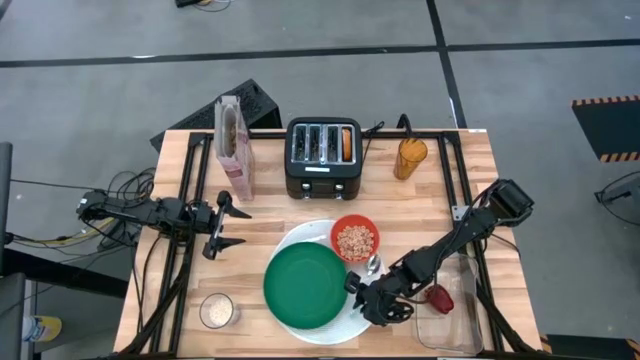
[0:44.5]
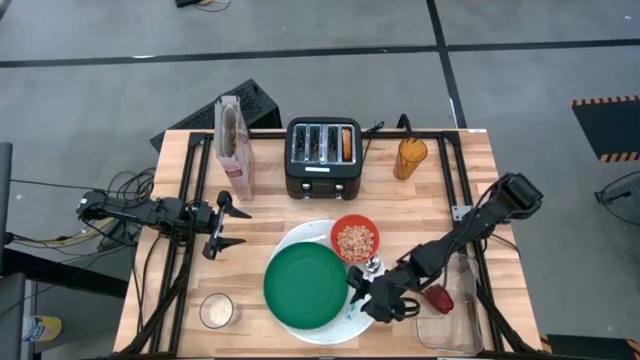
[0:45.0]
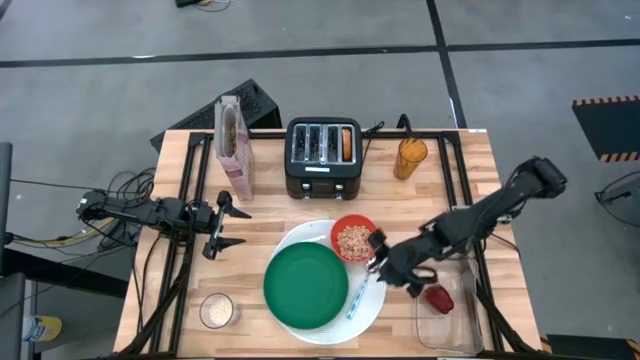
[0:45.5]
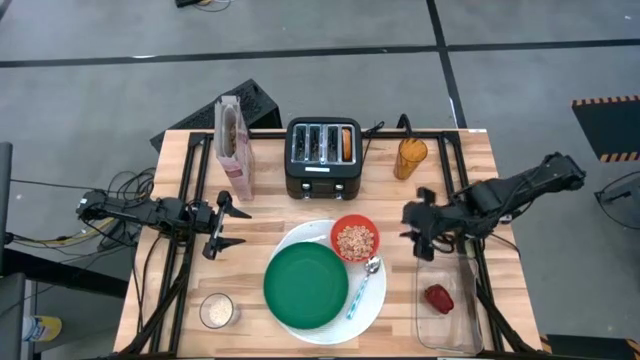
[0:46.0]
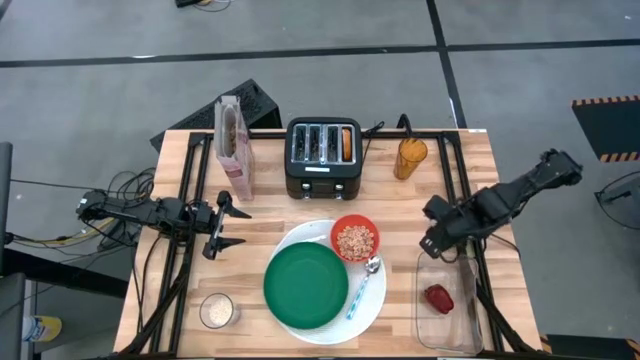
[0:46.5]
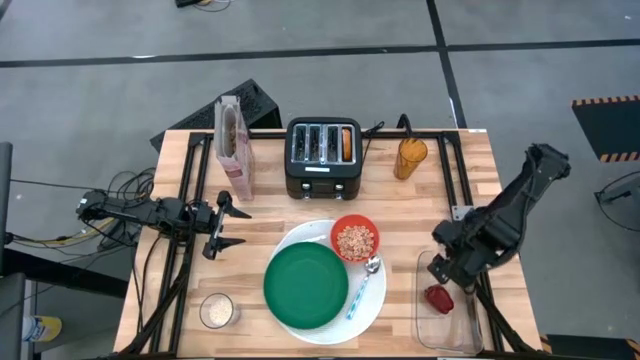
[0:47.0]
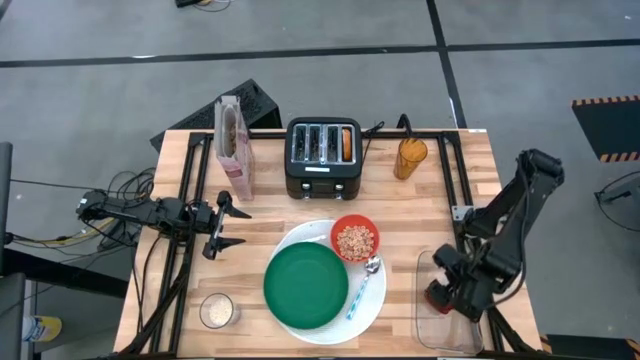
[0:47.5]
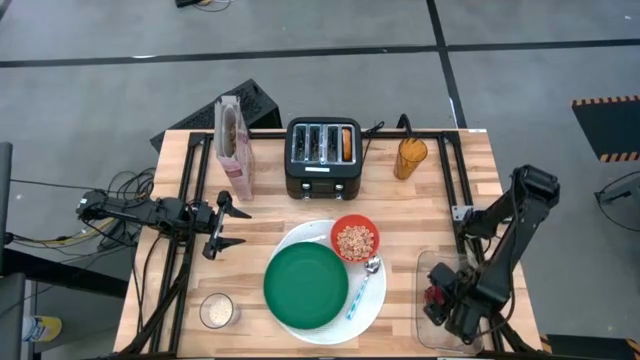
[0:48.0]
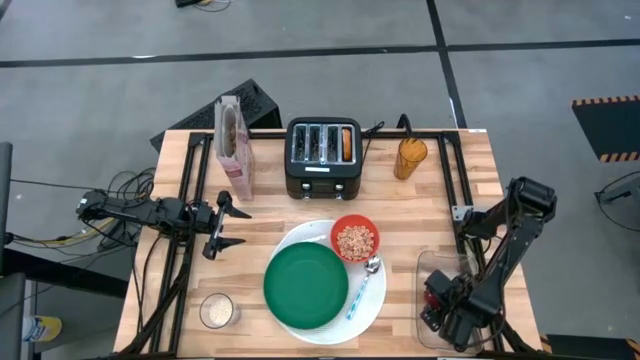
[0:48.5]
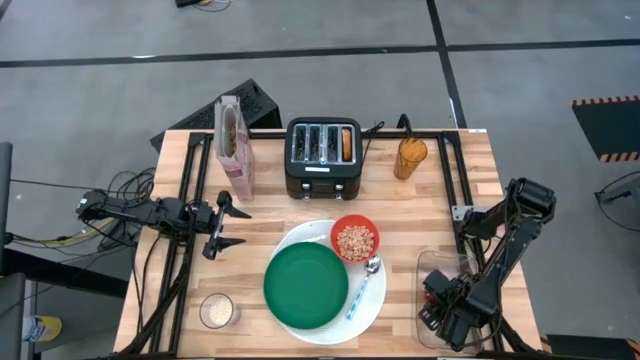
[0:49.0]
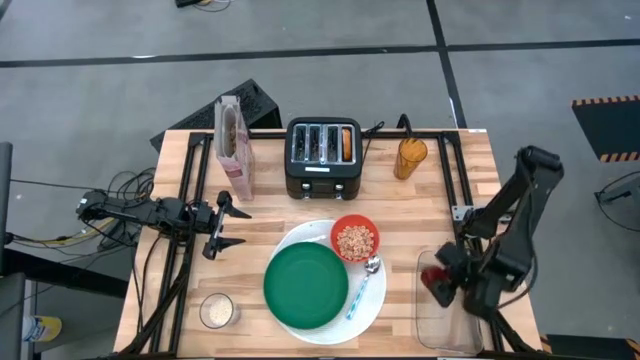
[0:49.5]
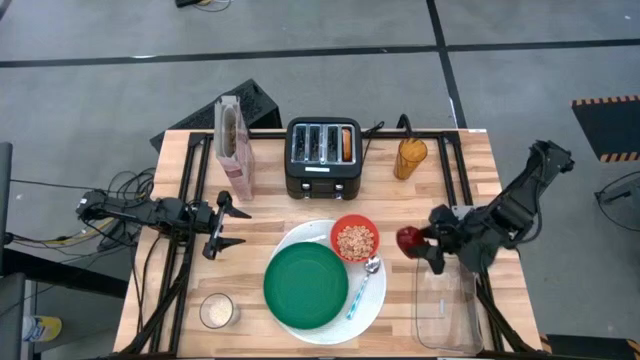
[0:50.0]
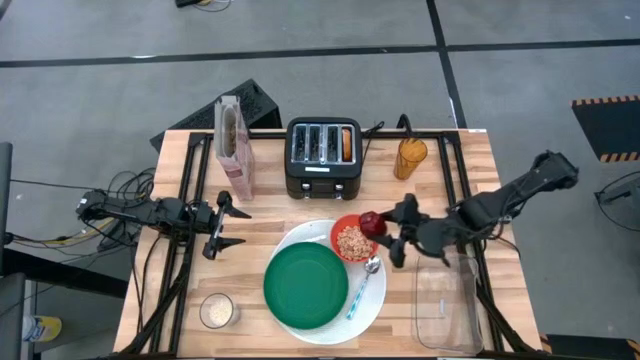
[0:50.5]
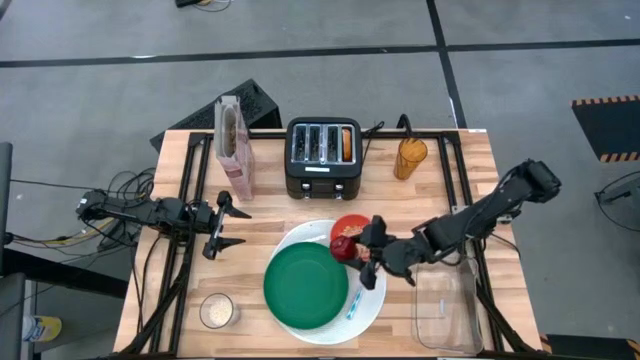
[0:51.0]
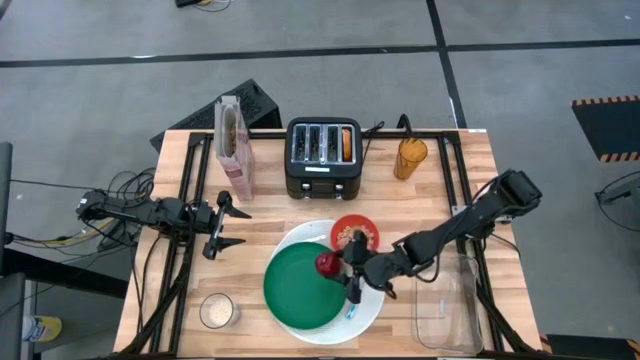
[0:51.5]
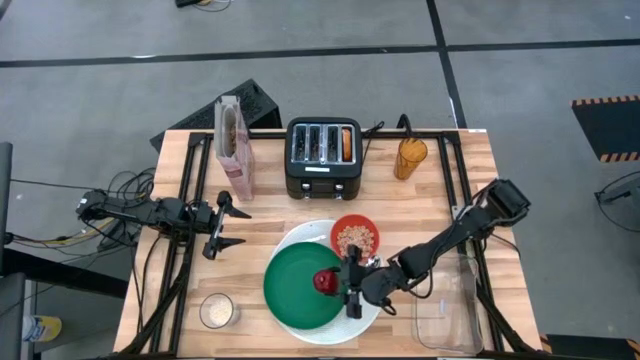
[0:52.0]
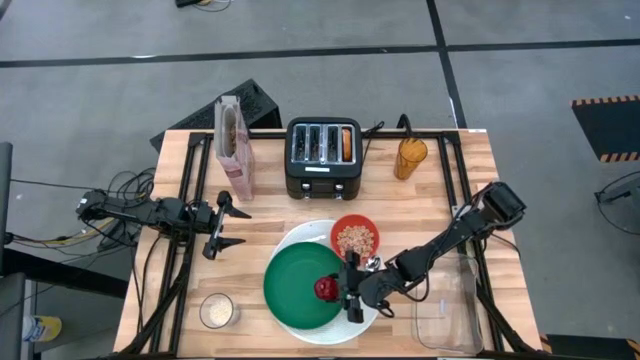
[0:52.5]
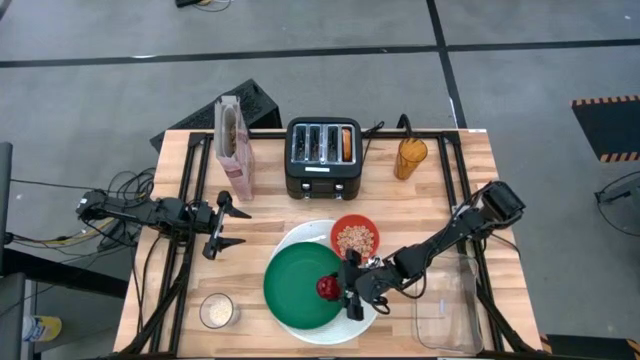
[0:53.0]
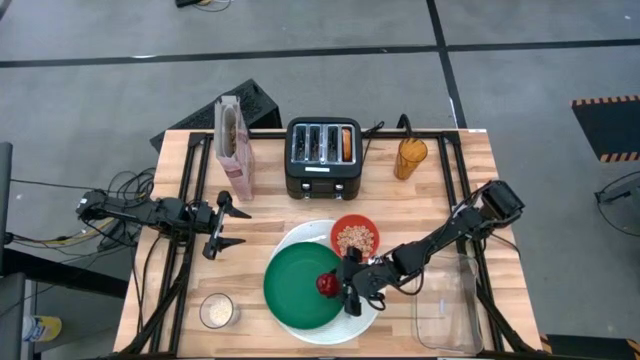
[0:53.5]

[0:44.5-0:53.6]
Task: Arrange a breakfast setting
Put the apple from the transparent bin on the green plate

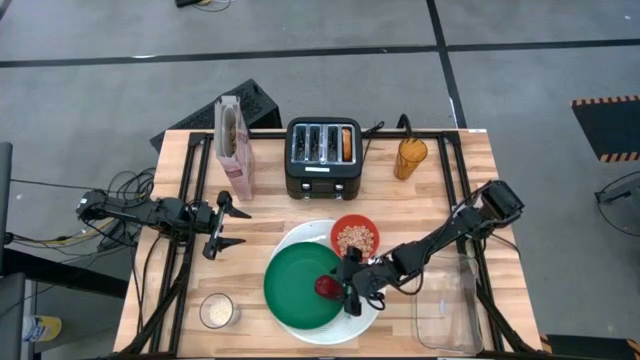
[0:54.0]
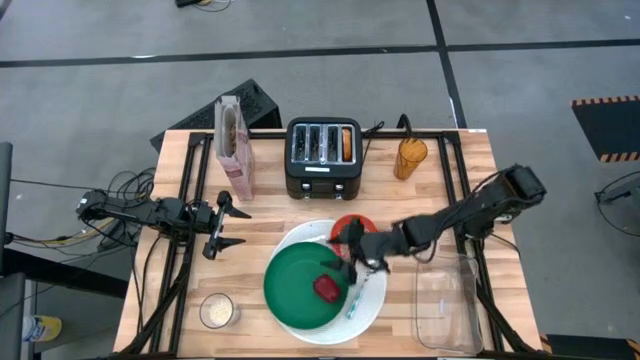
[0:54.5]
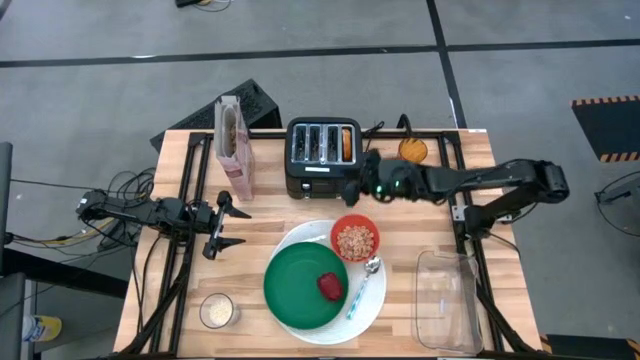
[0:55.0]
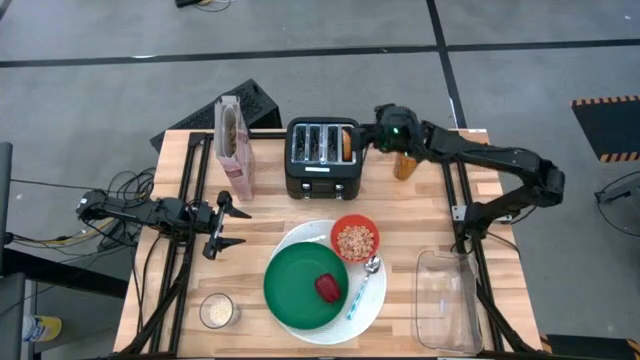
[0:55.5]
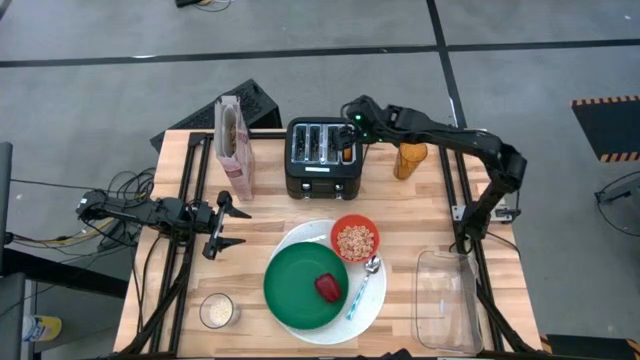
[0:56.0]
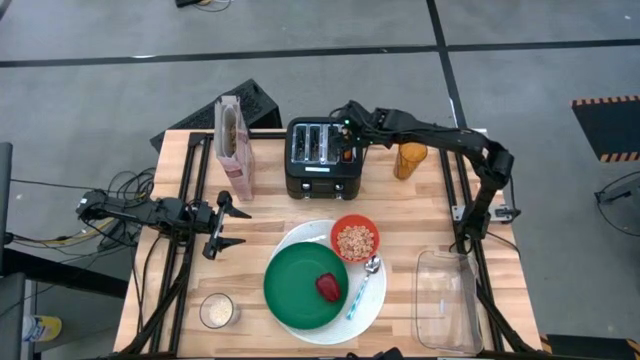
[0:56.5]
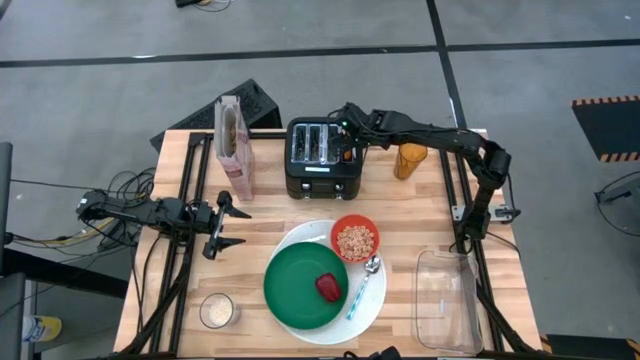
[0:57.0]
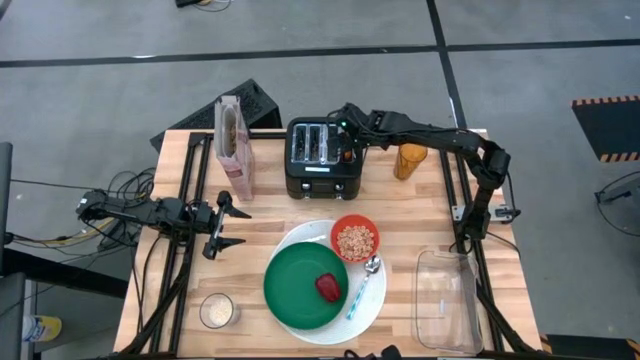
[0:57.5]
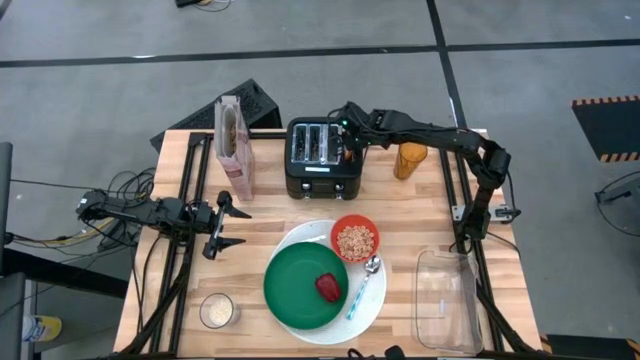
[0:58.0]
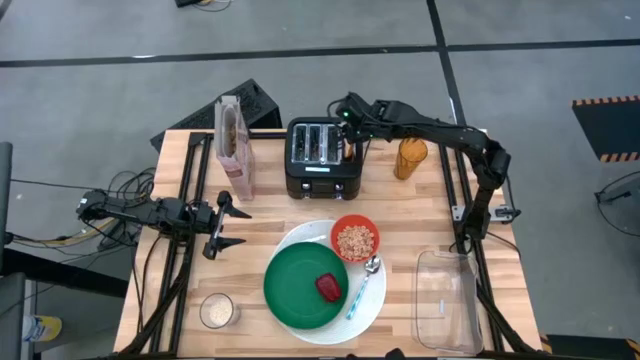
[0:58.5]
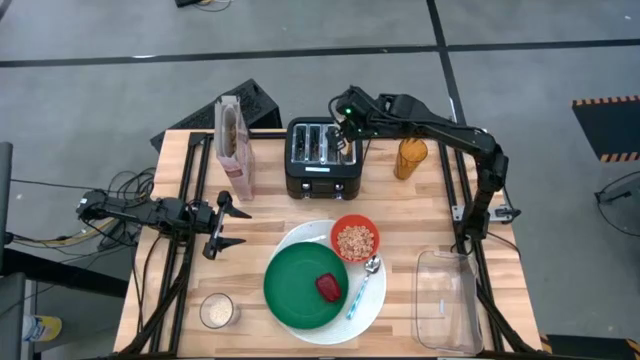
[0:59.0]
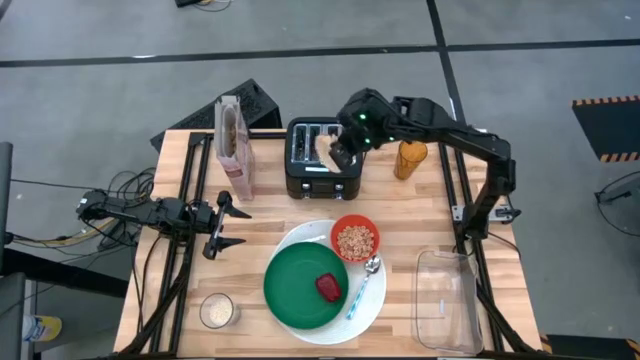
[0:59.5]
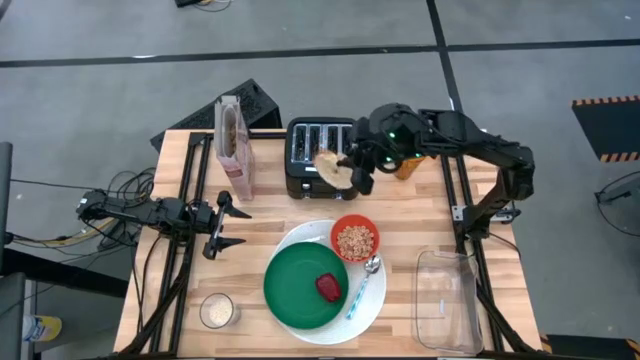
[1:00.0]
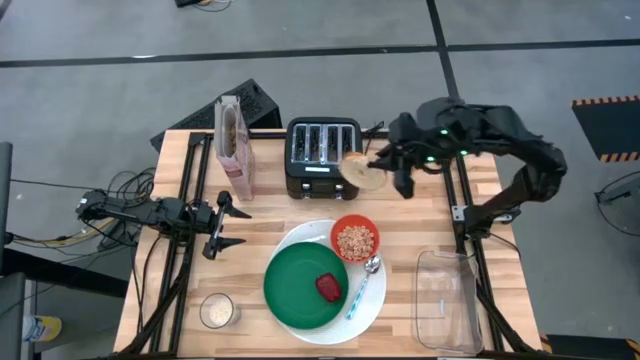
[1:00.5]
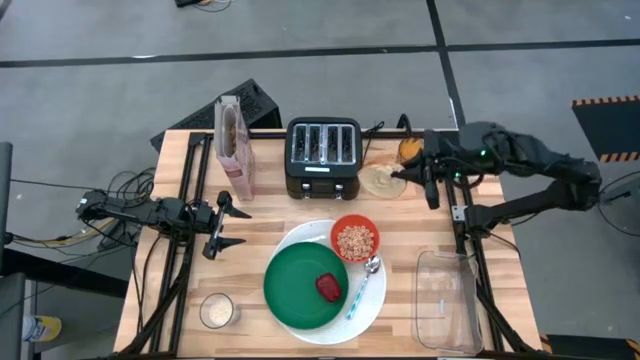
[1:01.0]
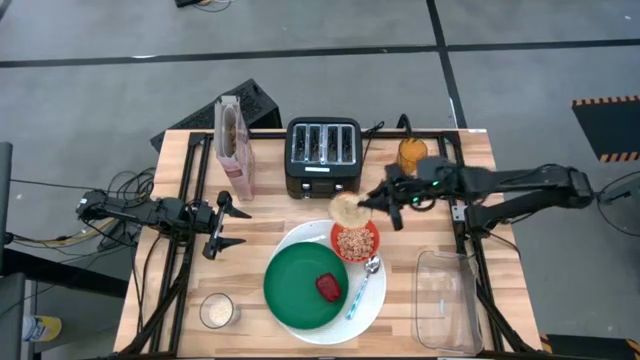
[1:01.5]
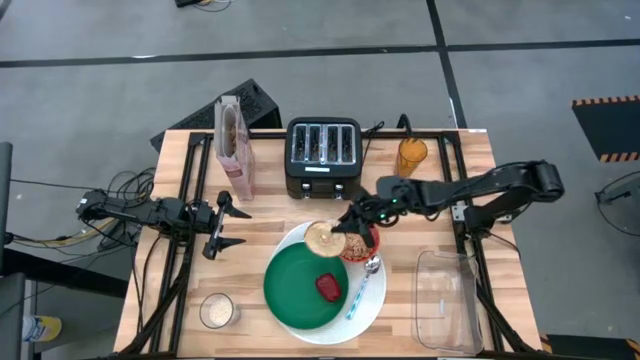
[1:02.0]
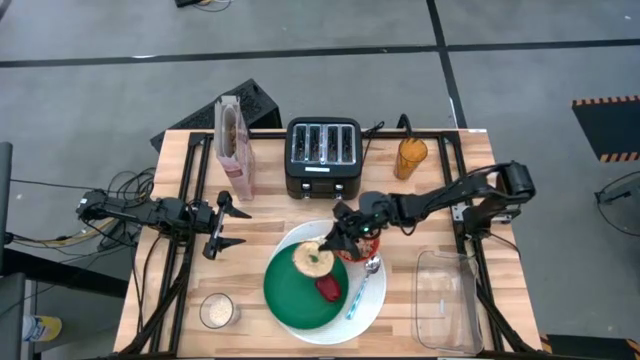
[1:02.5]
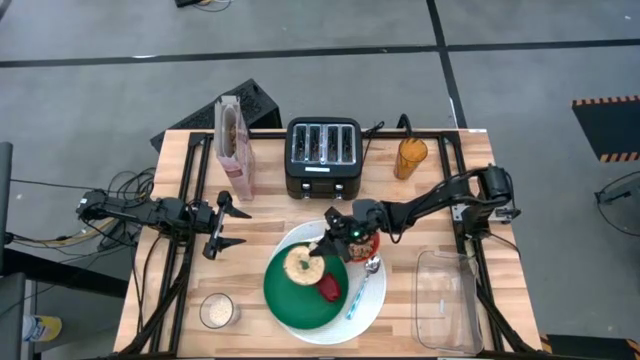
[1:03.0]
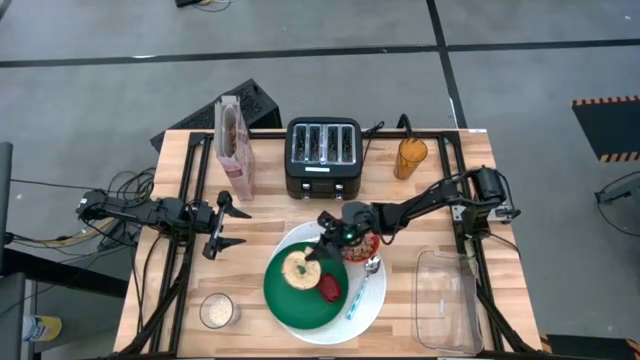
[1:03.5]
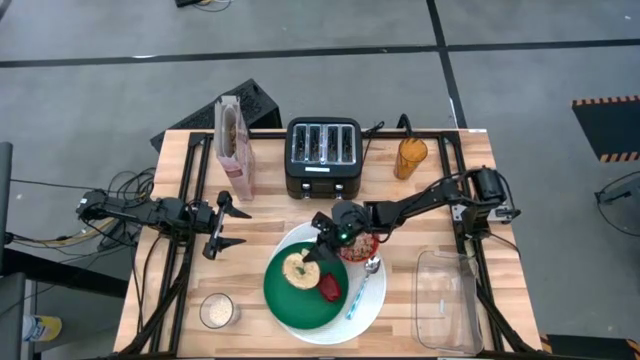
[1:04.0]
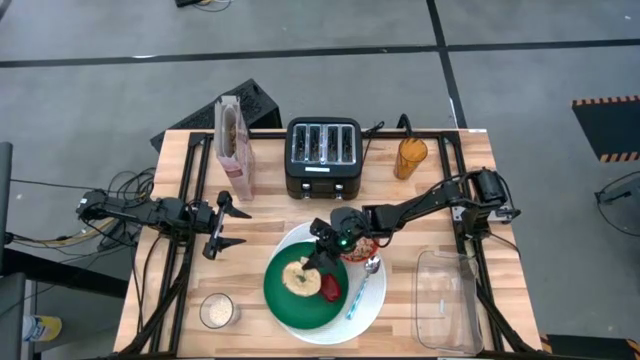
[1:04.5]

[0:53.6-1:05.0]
Put the toasted bread from the toaster on the green plate

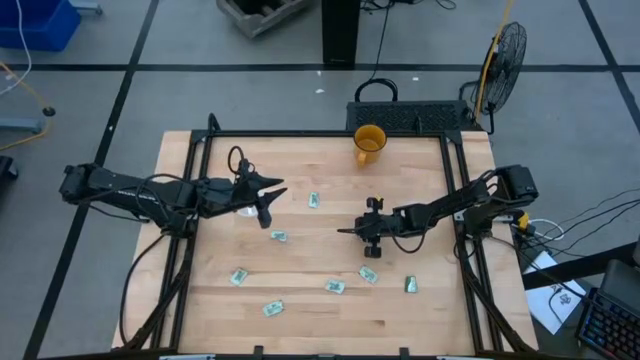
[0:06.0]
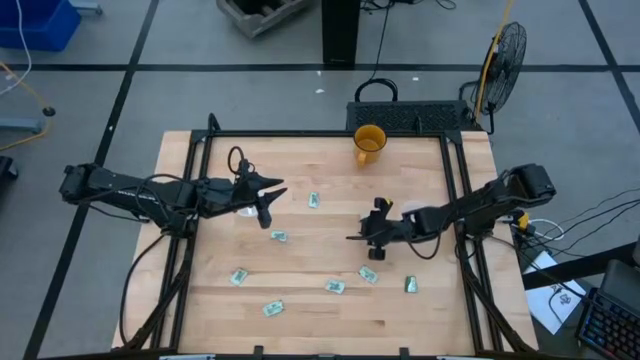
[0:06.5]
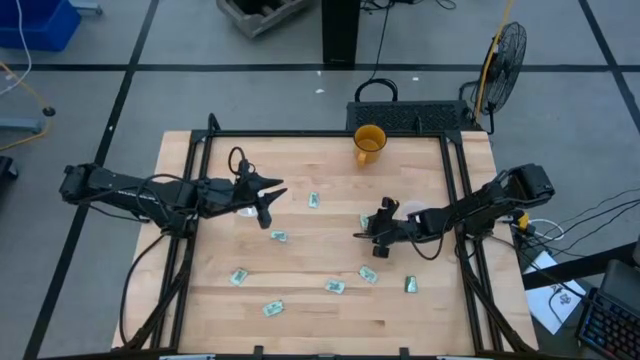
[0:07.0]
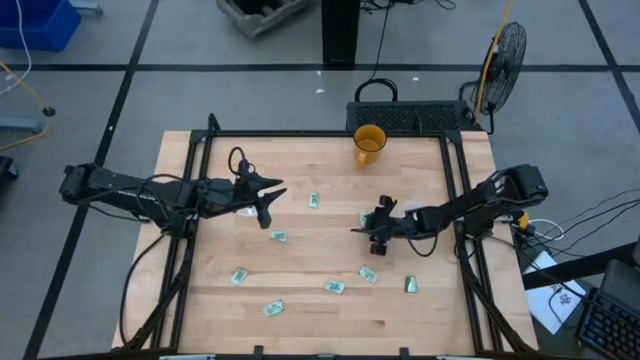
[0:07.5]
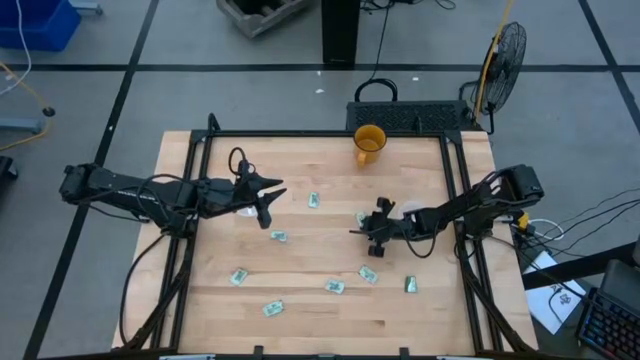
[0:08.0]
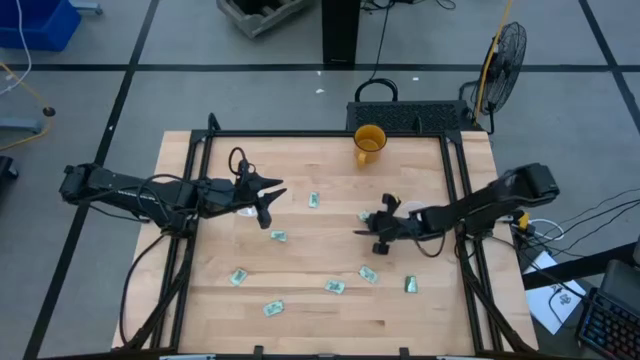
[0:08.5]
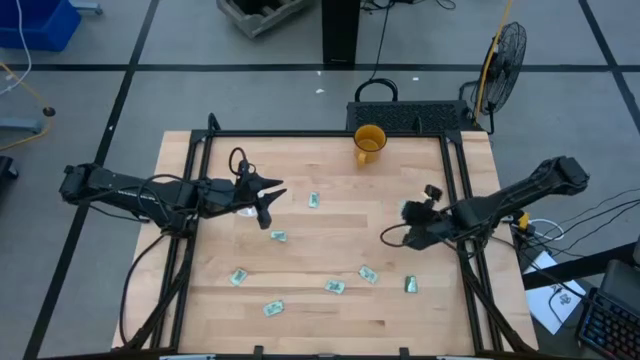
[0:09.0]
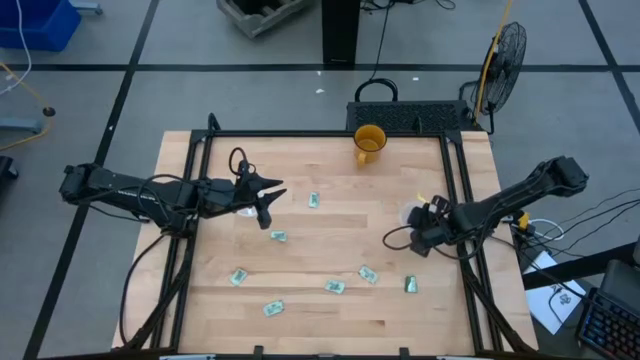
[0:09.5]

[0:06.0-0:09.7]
Task: Pick and place Stevia / Truvia into bins
Put the stevia packet into the right transparent container
